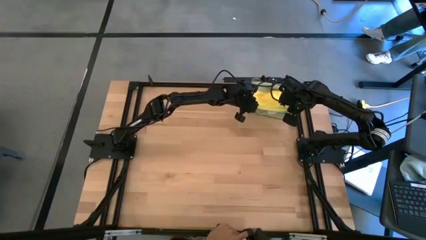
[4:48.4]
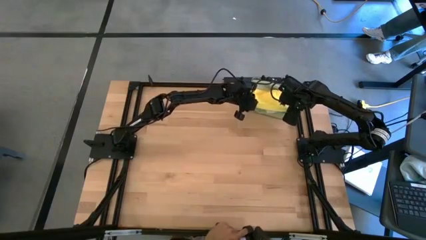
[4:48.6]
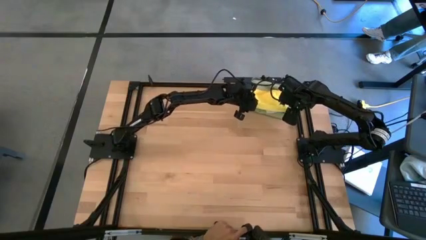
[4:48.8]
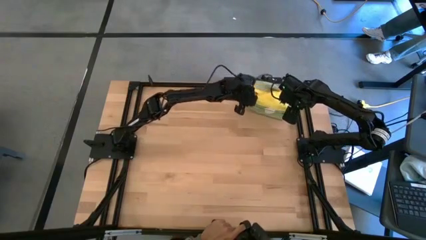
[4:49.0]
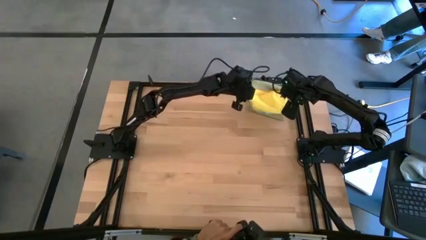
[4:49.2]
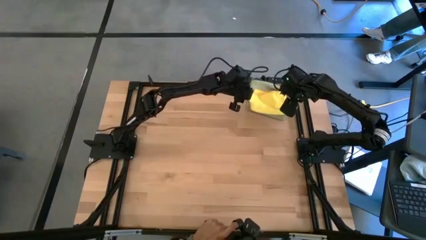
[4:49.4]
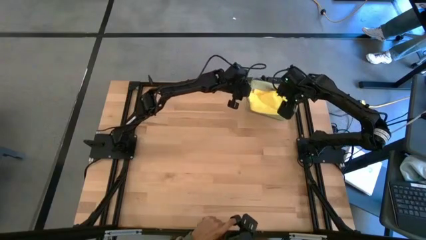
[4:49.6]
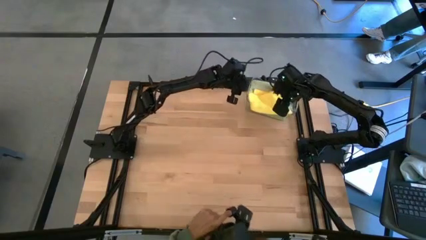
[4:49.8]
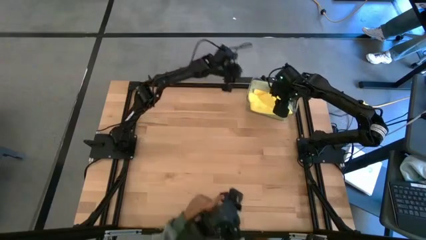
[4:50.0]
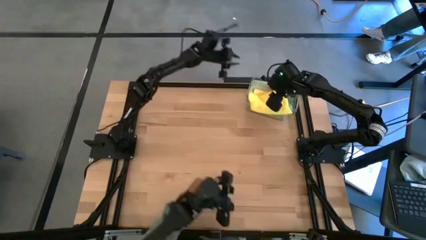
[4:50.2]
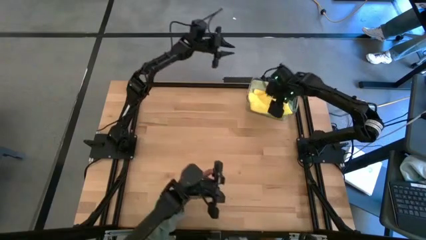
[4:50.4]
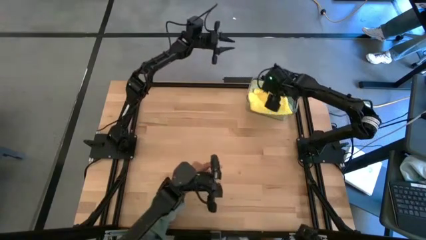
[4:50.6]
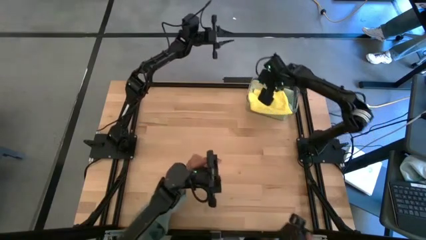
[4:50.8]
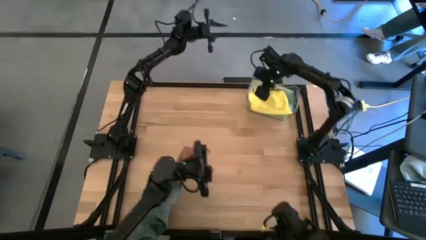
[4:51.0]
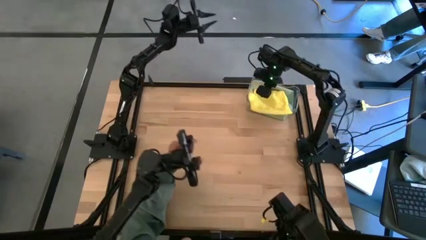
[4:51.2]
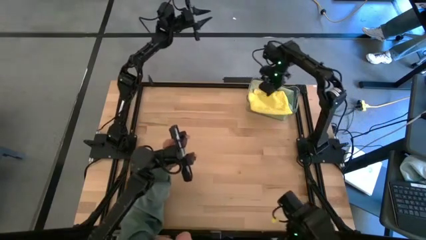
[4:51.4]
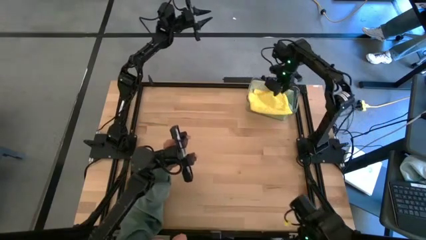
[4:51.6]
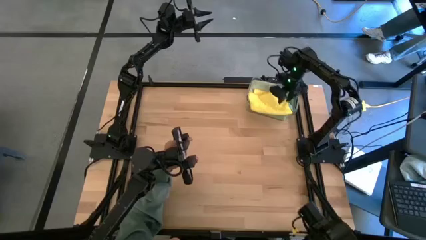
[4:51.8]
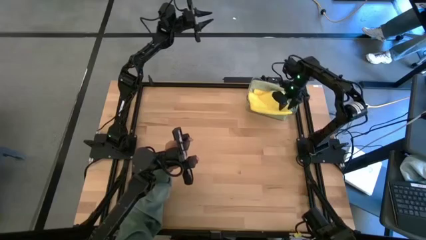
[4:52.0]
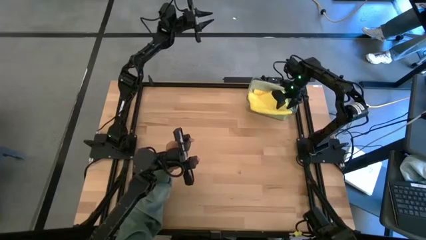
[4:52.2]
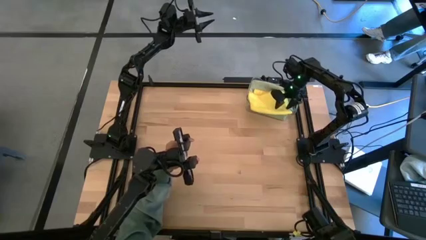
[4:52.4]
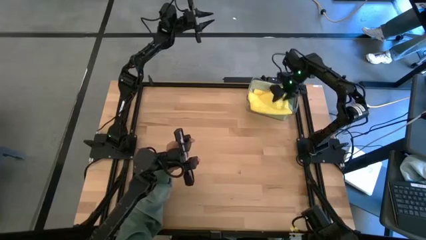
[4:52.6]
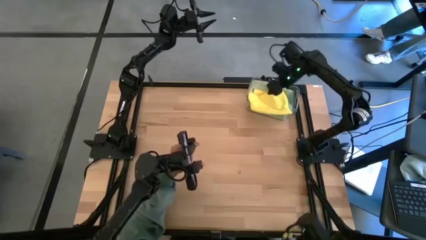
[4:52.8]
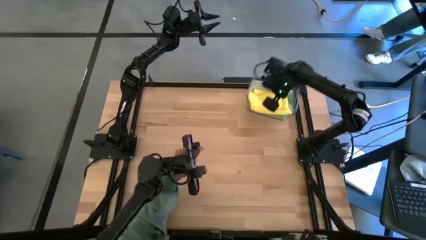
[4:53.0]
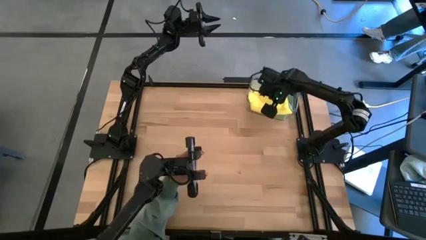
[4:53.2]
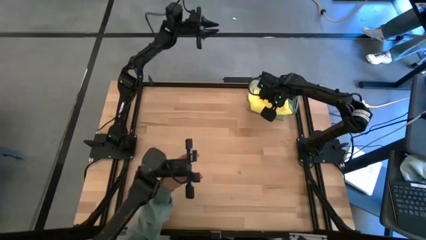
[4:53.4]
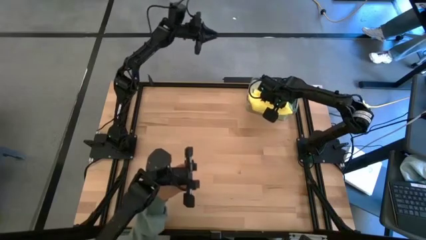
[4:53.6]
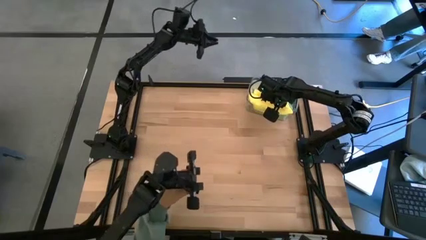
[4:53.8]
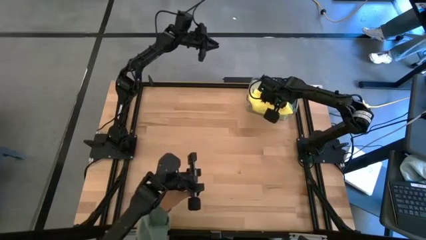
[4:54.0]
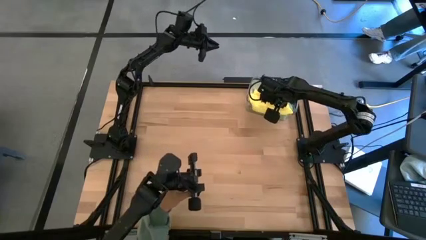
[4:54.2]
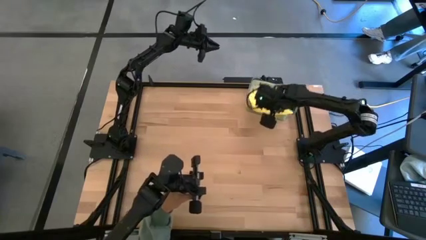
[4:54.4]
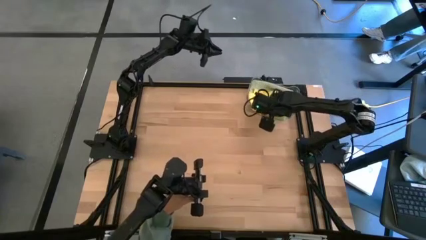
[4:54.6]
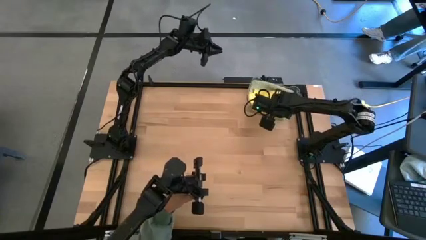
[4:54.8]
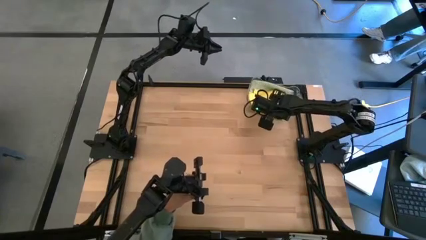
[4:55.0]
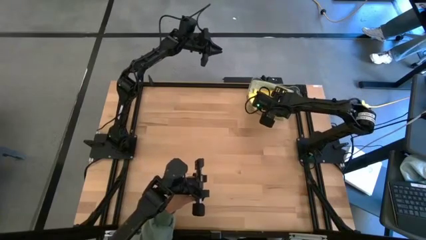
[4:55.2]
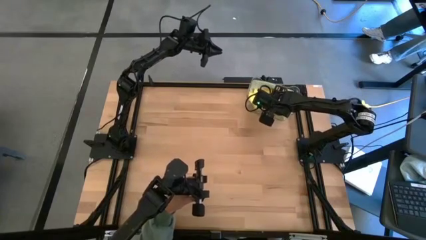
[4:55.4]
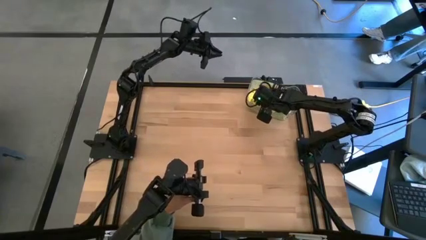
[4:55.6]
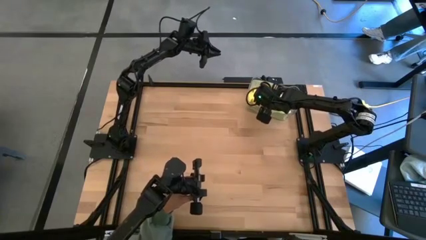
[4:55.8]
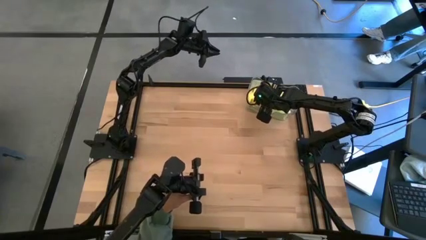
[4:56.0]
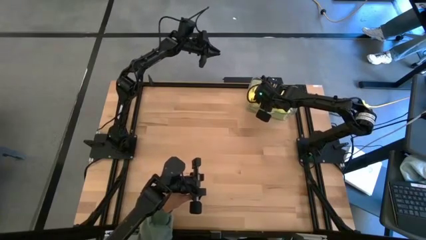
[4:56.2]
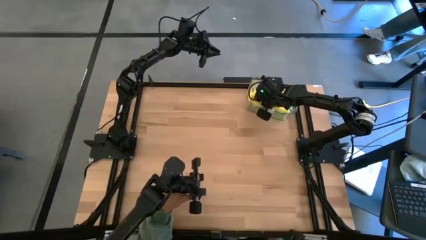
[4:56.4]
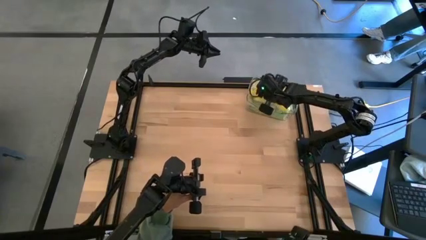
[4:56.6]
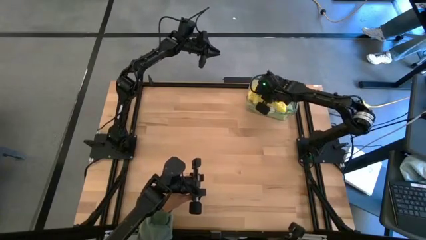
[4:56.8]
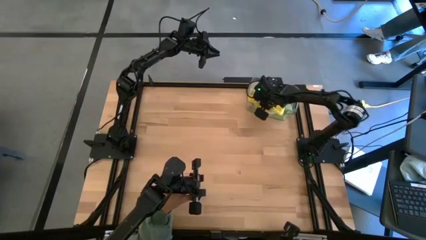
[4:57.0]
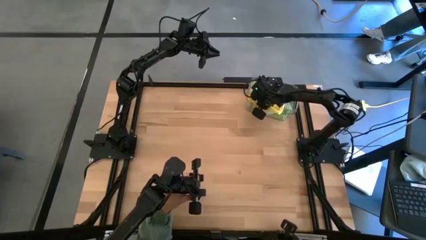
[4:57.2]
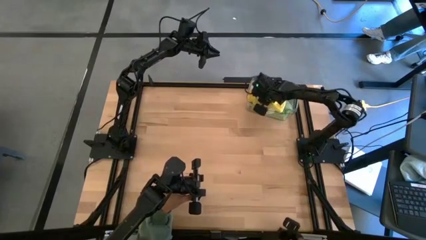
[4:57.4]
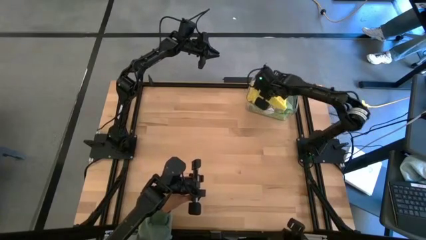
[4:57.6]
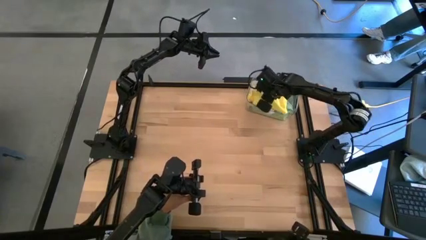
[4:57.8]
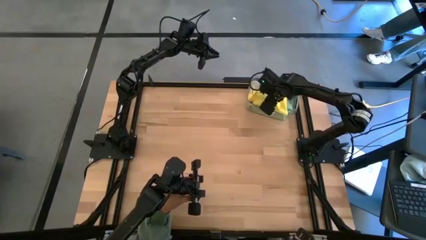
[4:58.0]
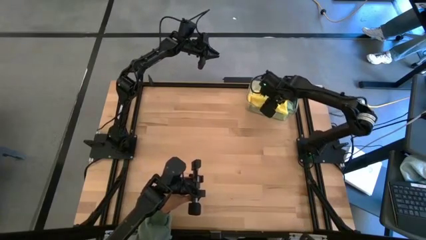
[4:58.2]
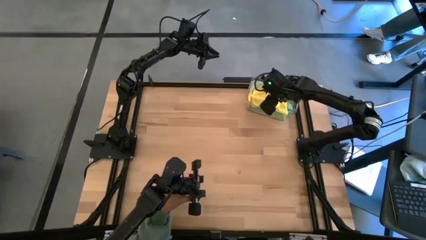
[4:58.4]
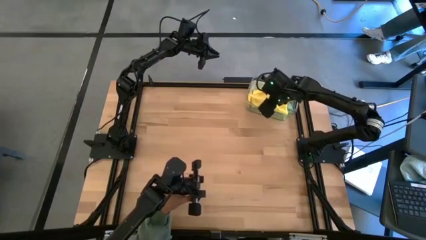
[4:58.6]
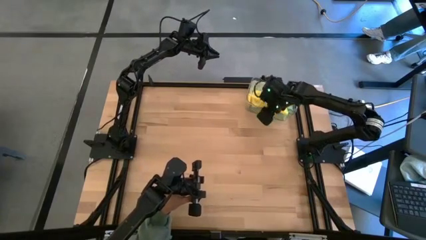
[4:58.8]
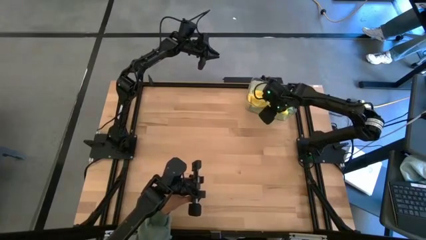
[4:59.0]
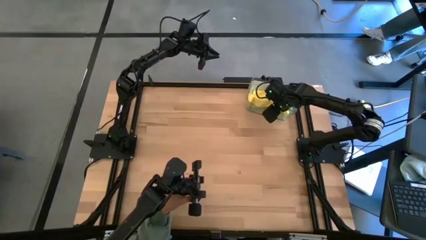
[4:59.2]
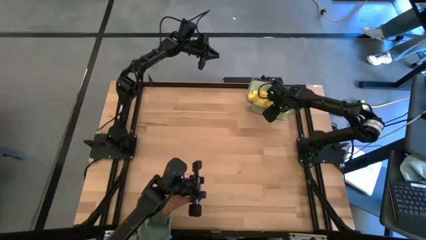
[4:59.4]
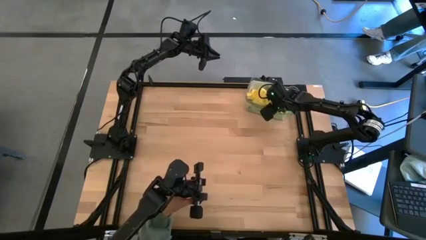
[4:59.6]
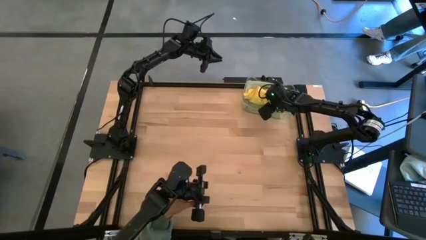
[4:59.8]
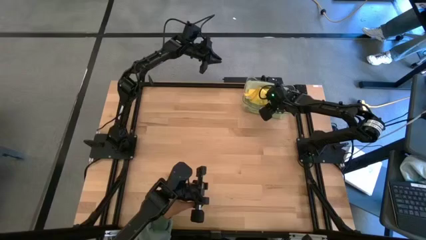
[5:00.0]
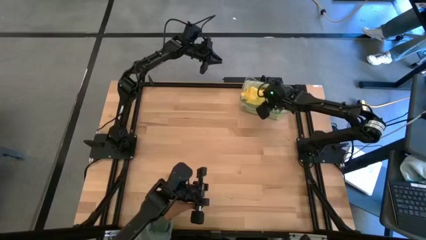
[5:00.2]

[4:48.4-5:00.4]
Task: Fold microfiber towels
Put the yellow cloth into the transparent bin

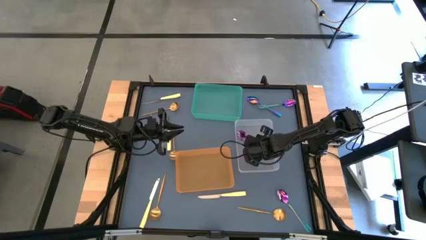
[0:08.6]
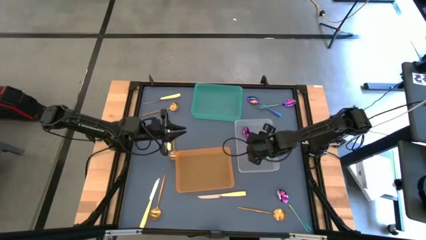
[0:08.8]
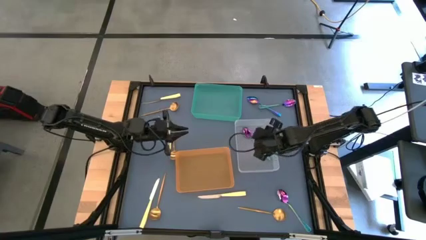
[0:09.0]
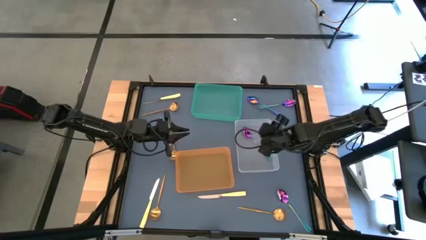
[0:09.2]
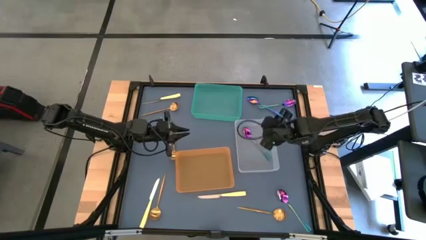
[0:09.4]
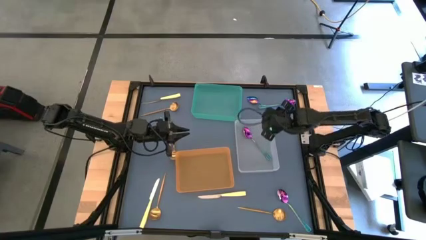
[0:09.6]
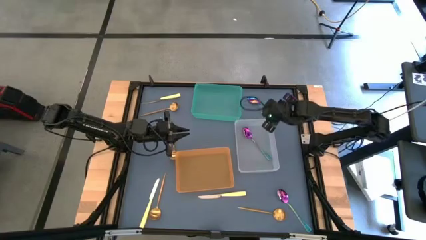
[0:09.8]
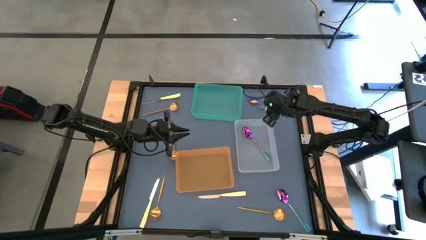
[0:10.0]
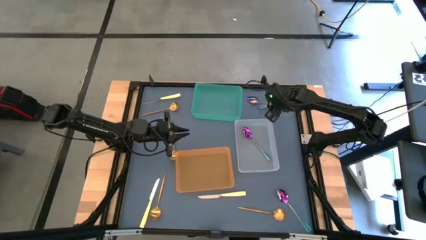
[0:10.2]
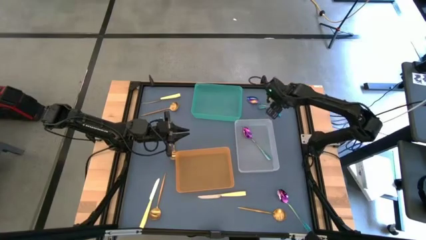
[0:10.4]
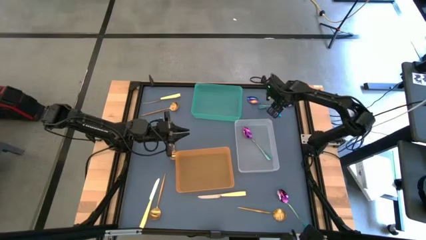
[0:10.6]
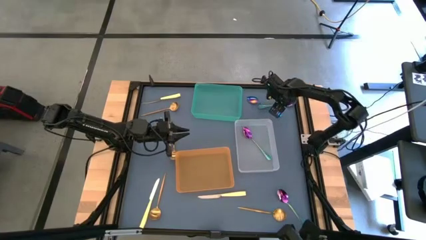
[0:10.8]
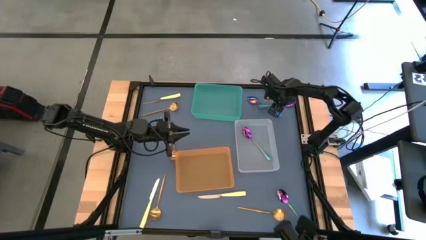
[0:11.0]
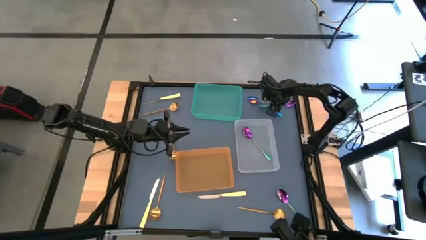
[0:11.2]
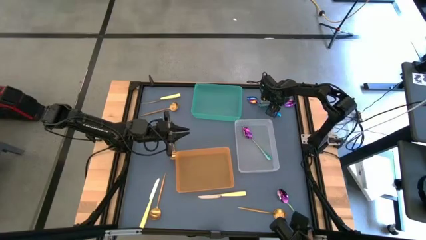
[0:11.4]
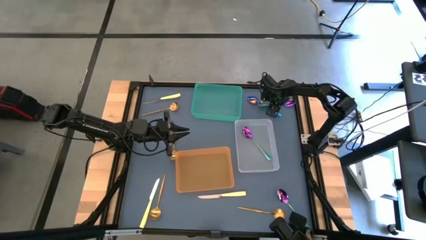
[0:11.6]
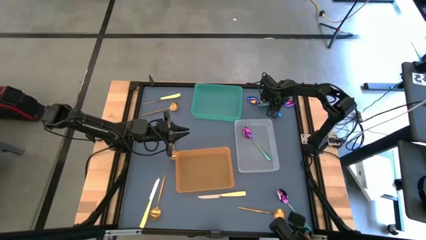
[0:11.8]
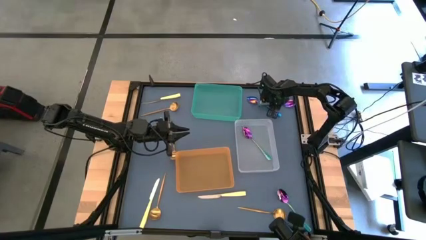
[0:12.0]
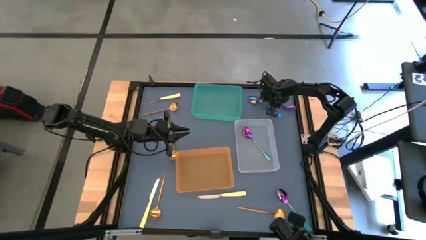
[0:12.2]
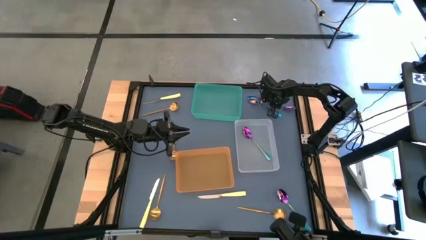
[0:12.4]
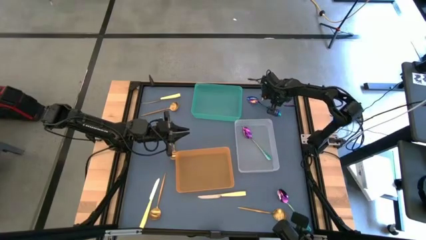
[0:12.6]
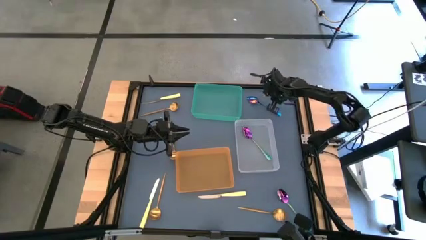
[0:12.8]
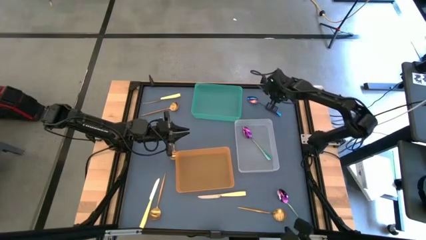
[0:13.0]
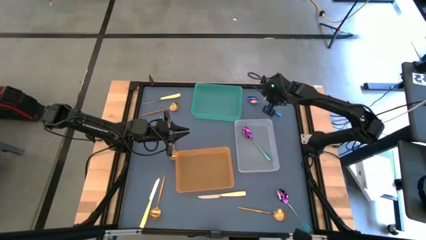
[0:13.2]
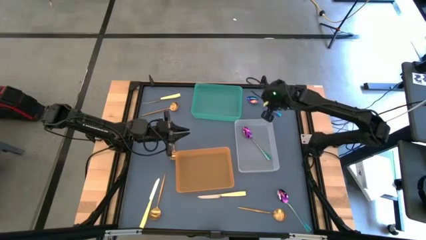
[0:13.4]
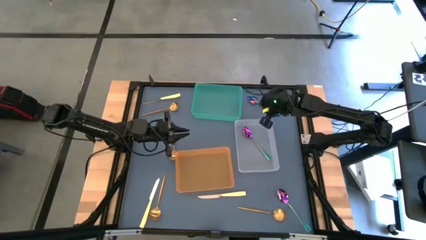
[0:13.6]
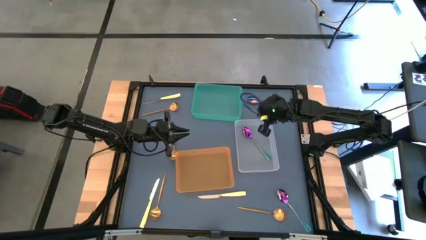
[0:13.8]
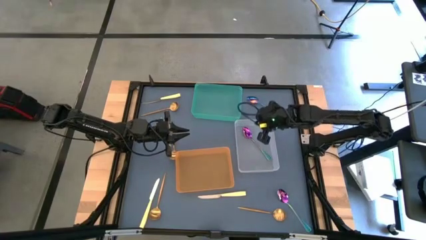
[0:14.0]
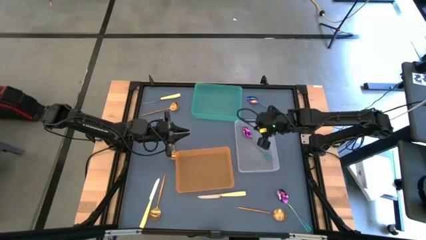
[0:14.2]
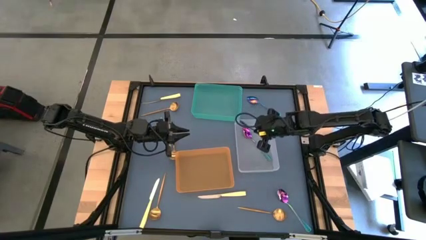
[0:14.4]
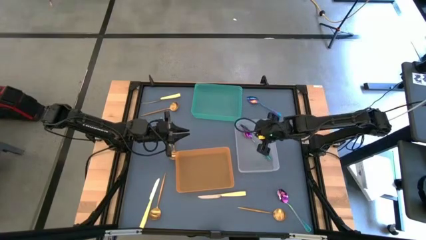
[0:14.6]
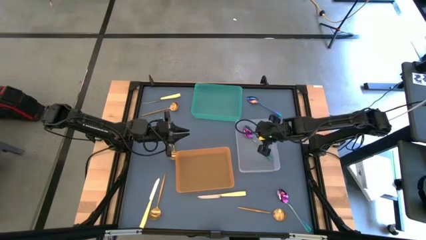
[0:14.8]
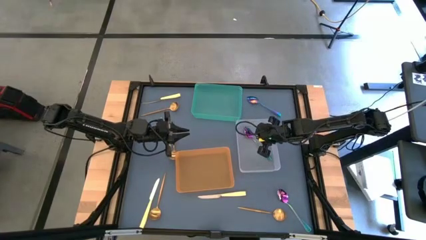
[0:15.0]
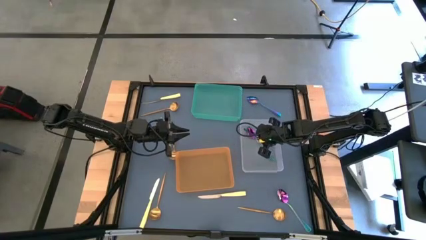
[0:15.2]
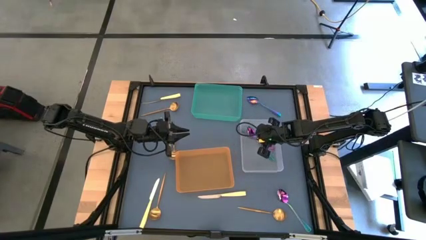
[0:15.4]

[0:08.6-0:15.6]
Task: Sort silverware by color (type)
Put the blue spoon into the transparent bin
